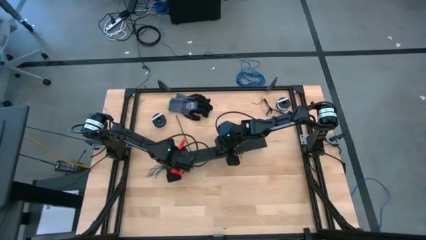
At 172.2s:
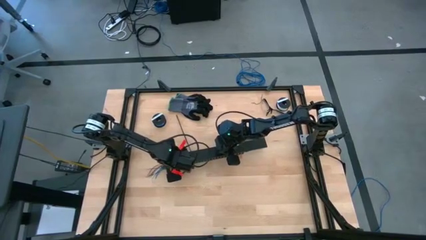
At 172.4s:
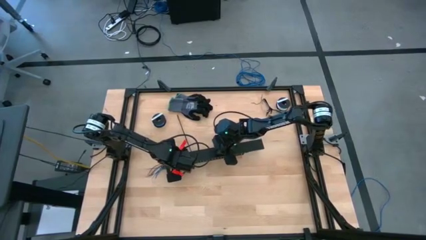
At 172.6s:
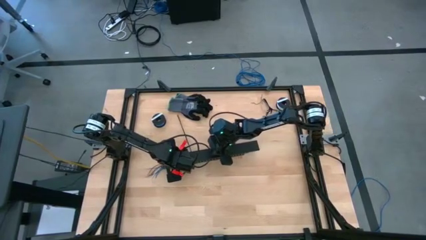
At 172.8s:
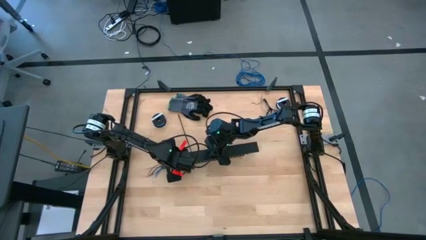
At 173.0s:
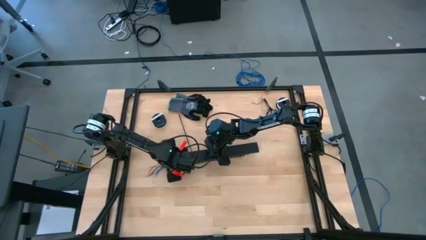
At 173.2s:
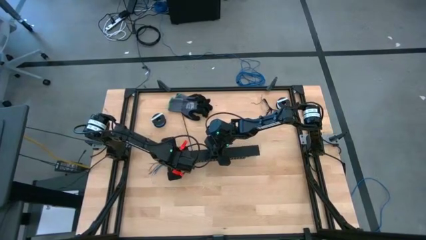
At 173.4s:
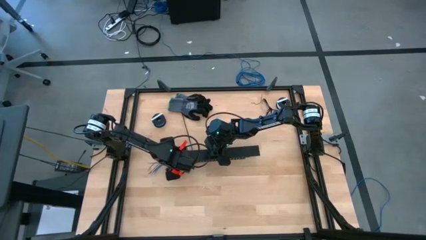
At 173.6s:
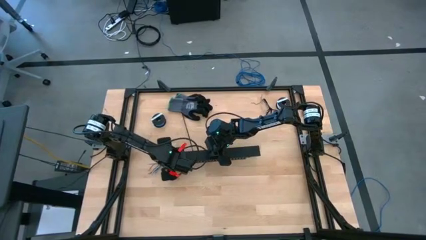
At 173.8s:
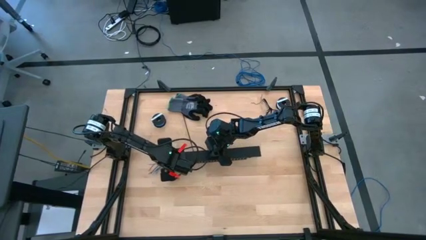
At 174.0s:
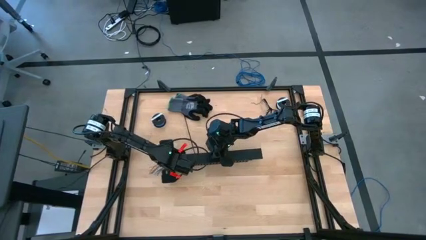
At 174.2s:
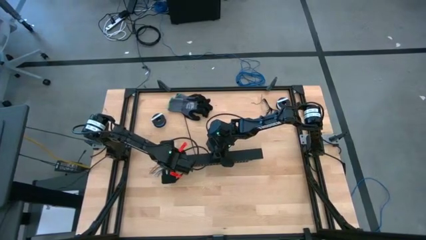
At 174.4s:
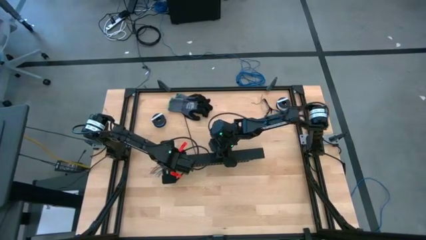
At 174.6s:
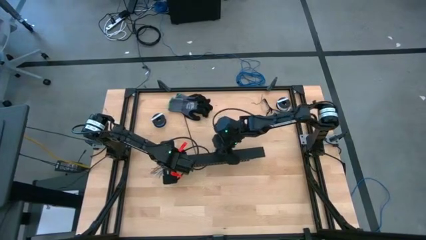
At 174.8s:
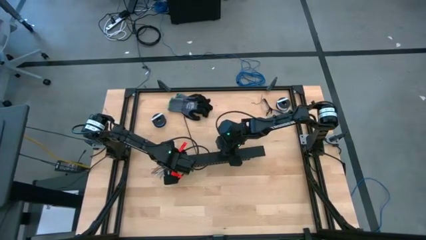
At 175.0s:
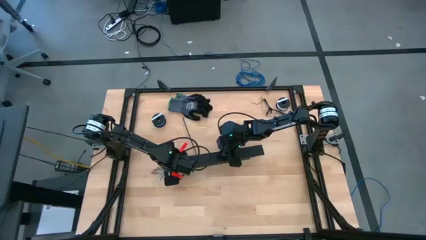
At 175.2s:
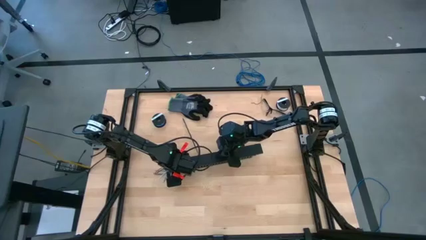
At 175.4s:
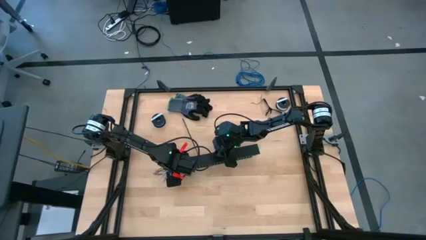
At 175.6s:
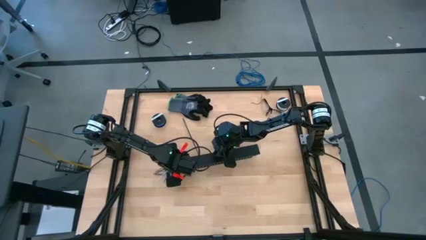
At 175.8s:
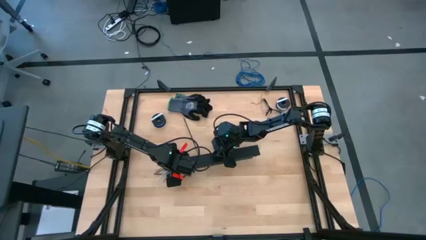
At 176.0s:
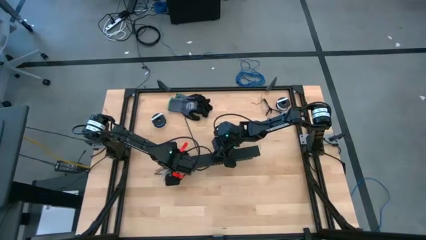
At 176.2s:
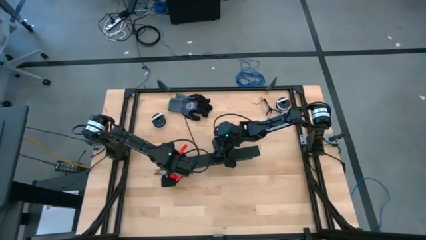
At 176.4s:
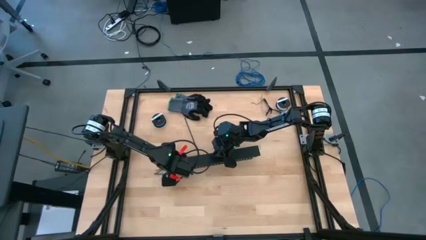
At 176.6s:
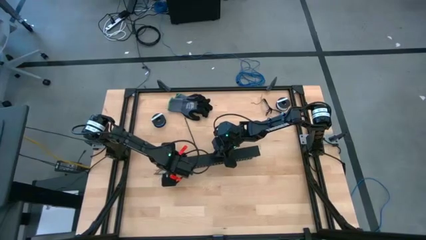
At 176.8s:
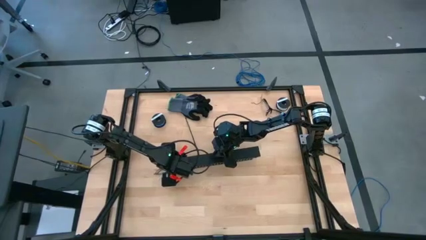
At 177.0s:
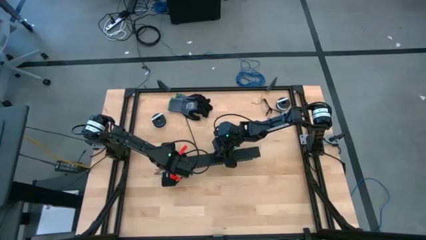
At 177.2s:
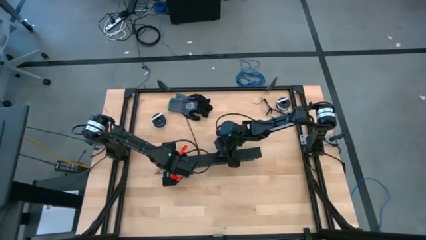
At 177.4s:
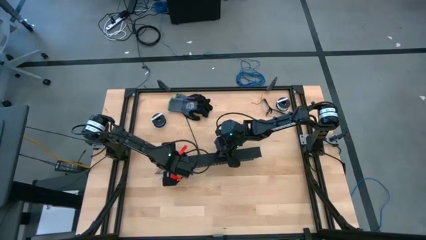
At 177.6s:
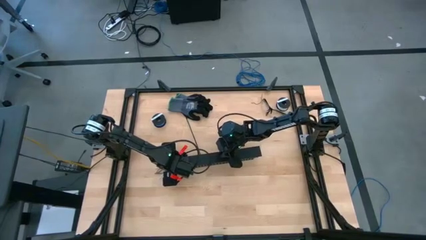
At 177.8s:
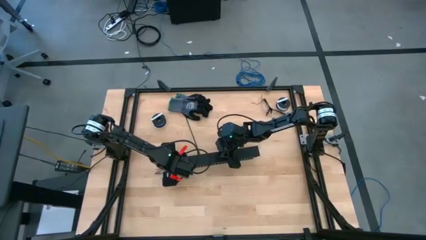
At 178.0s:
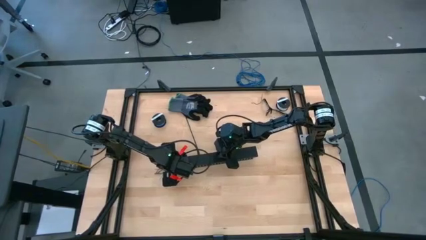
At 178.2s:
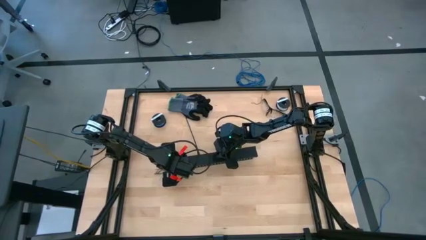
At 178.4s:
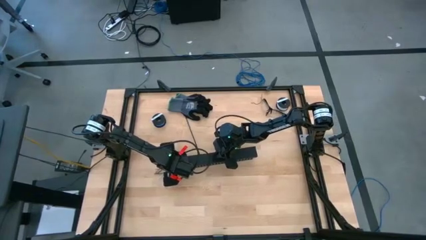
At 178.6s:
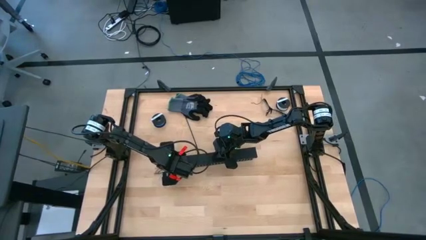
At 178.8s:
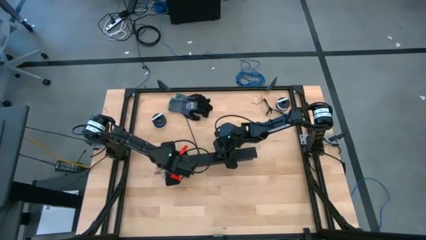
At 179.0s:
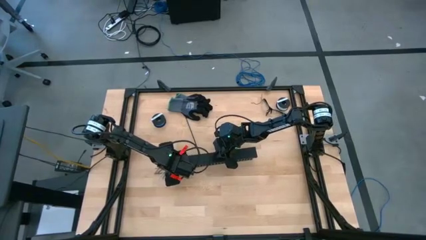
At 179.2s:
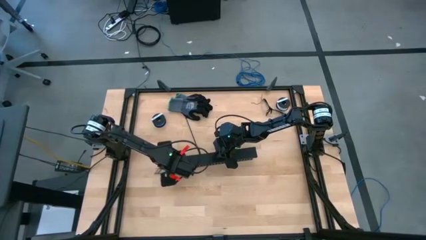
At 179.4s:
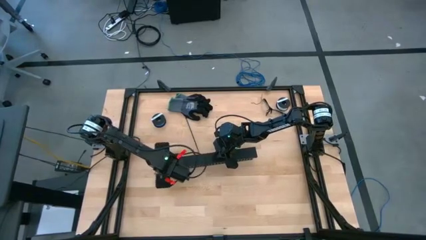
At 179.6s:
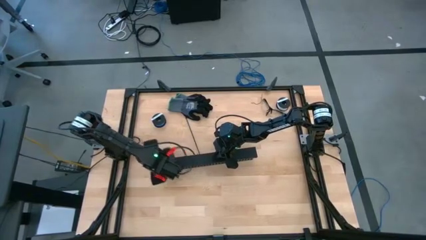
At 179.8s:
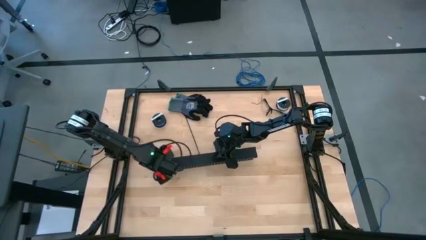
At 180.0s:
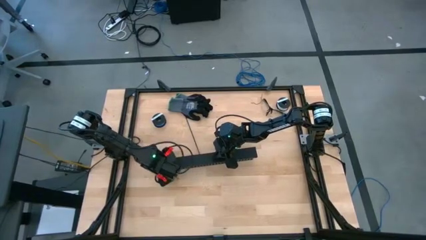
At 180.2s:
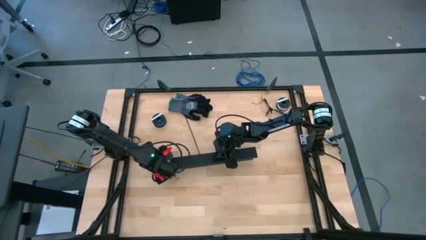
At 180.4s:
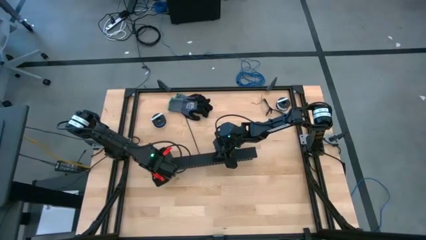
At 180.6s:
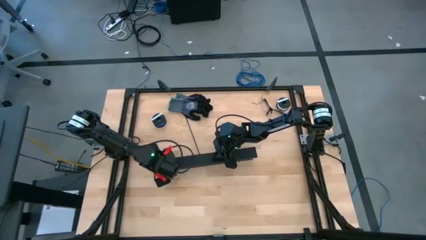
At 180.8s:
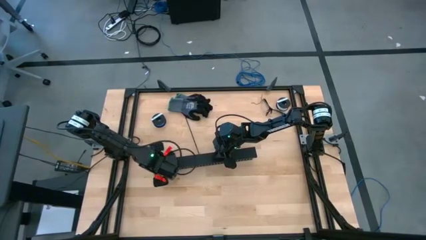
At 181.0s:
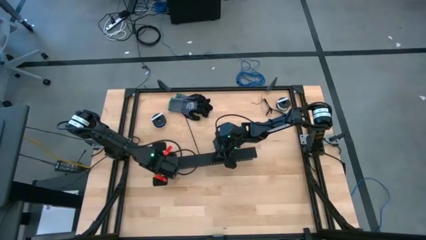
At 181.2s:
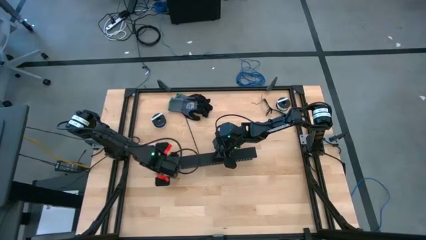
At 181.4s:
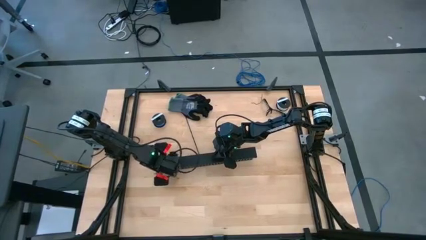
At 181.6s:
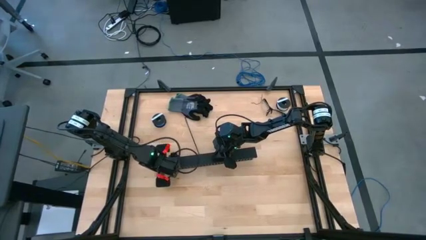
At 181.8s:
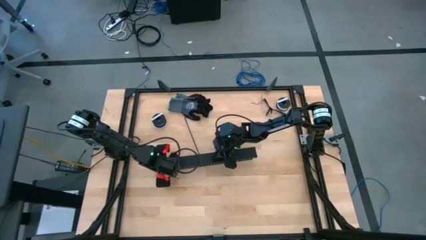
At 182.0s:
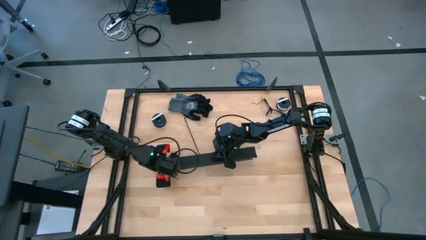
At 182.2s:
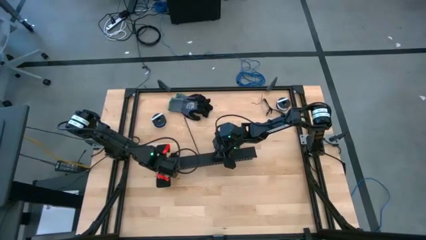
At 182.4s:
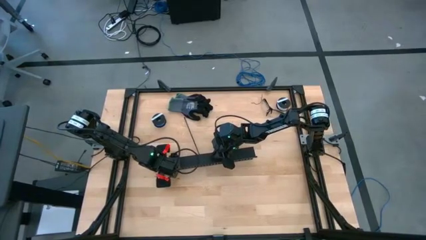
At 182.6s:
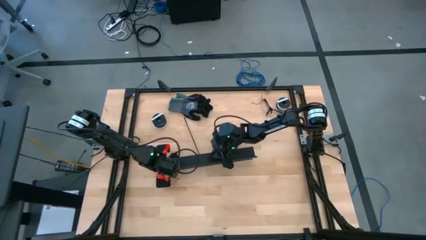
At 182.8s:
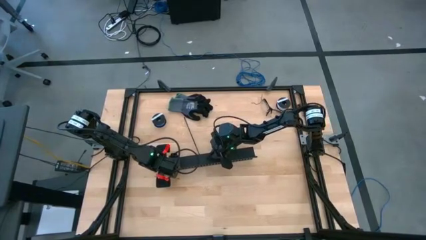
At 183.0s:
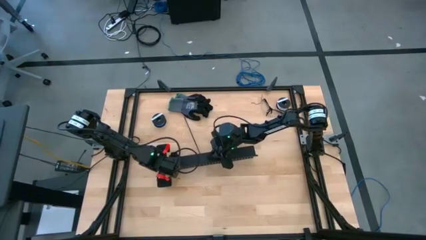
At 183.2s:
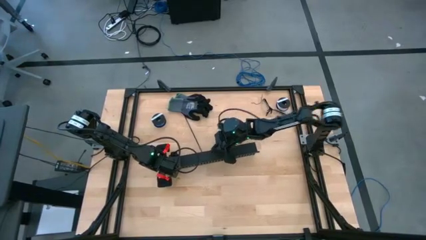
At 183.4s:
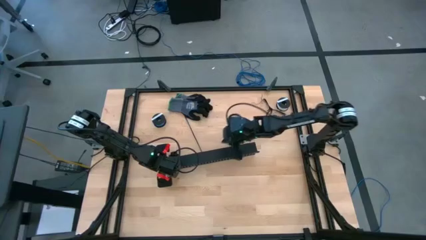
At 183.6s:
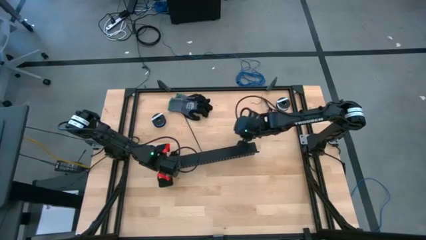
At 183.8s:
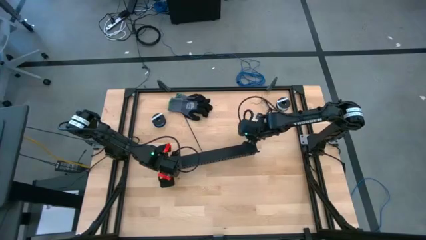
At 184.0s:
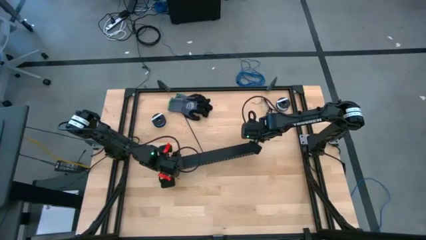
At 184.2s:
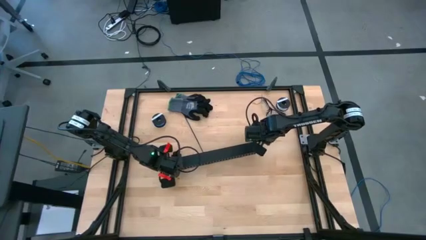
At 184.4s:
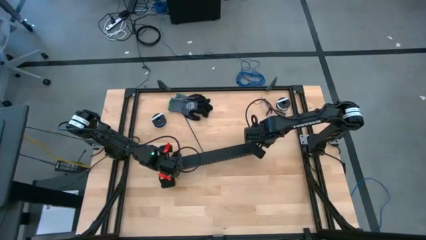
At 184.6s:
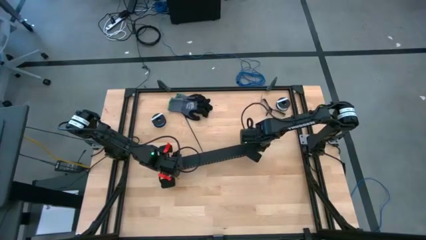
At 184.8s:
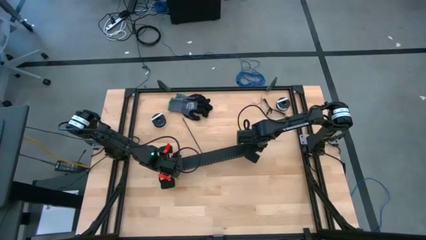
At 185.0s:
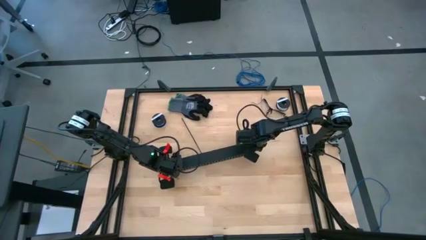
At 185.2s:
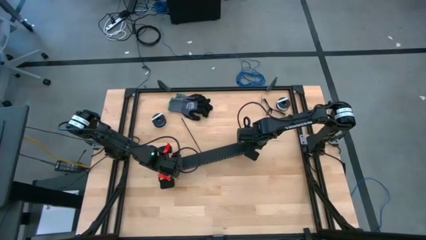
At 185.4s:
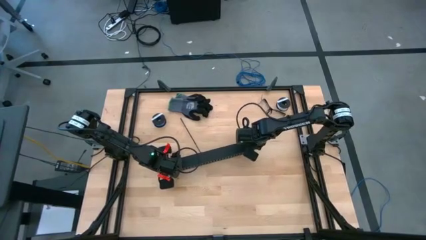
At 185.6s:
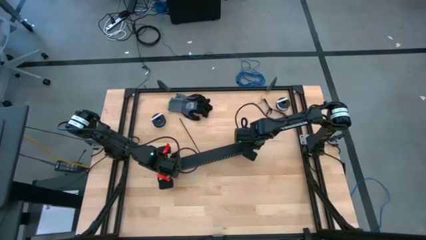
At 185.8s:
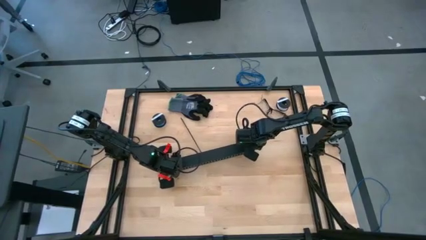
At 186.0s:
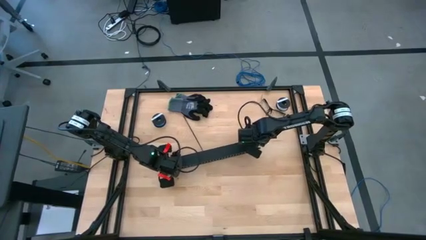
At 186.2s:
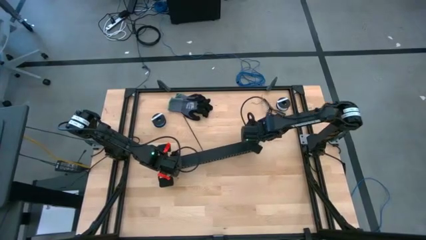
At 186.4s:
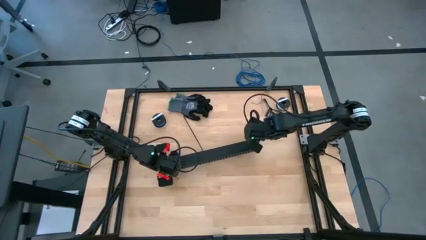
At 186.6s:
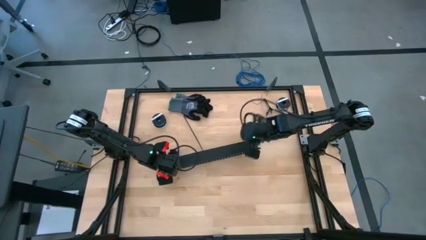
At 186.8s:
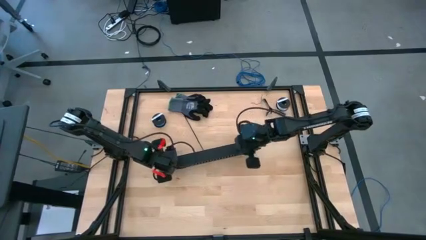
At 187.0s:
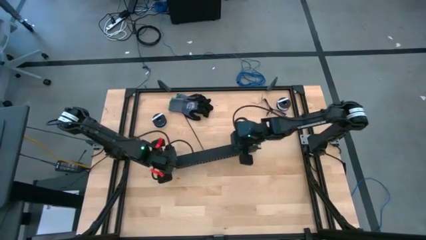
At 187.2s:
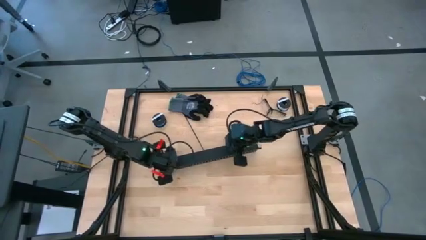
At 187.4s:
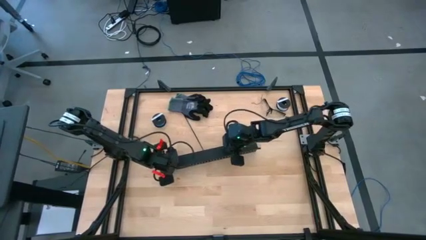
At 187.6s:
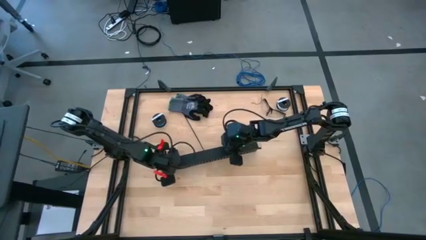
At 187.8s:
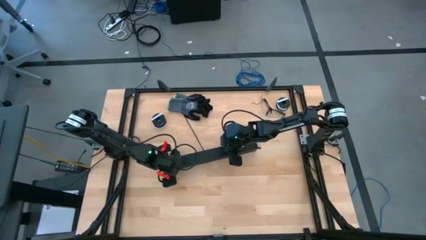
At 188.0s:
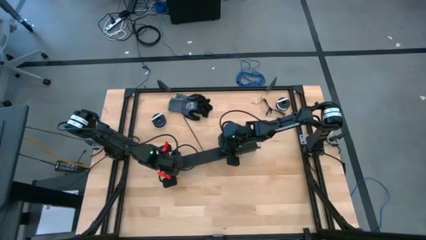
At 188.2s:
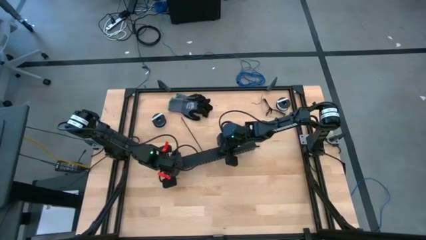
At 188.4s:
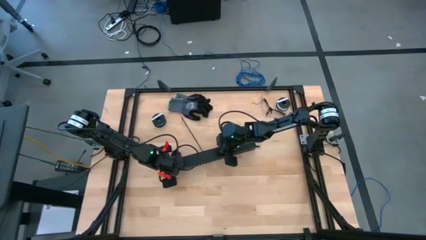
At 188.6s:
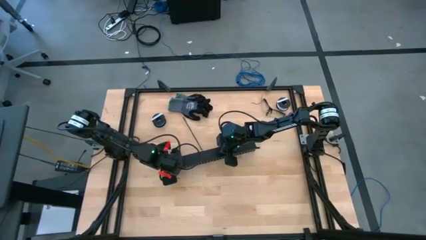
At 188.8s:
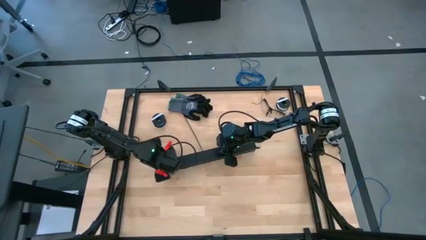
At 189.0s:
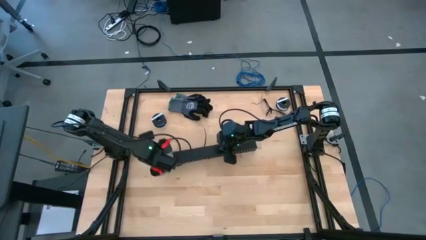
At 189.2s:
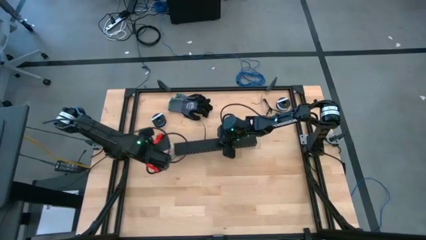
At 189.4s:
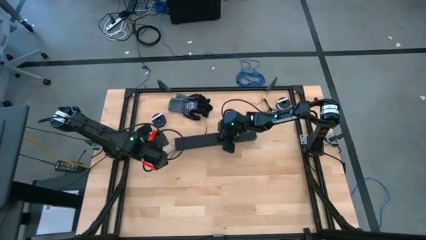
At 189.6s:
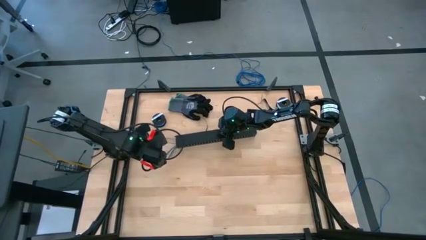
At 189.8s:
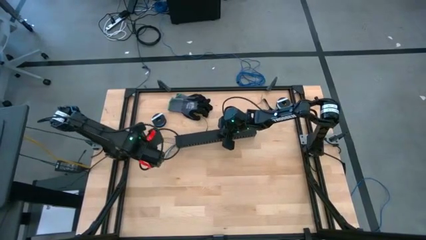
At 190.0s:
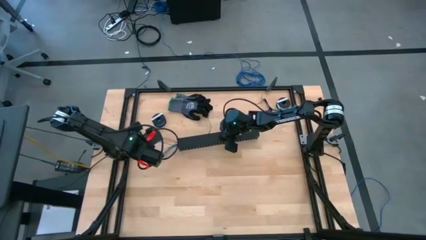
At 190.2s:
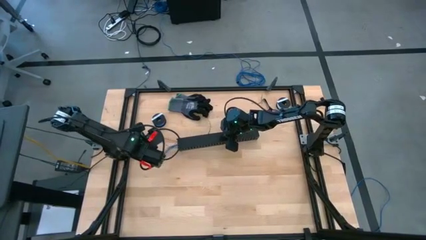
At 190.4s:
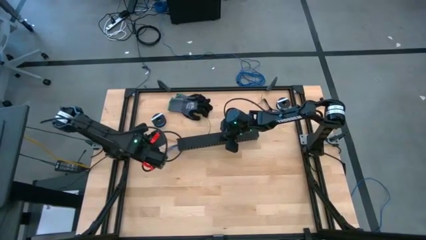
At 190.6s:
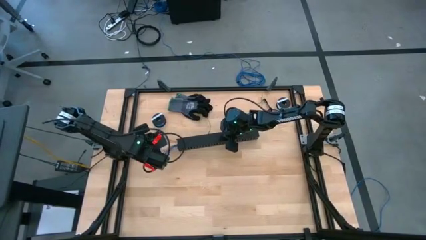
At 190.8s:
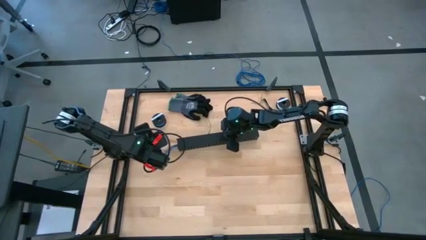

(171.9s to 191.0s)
Task: Ziptie cables
Close the black cable duct with the cover
